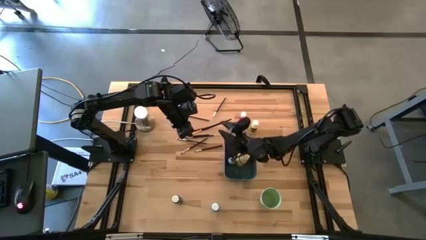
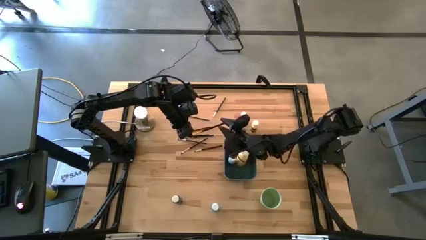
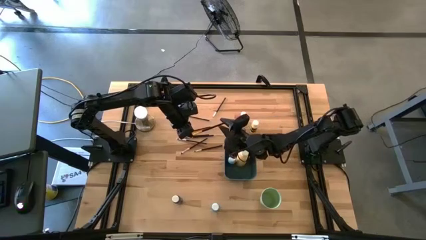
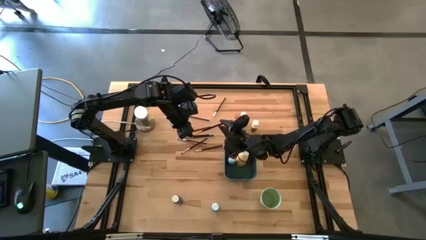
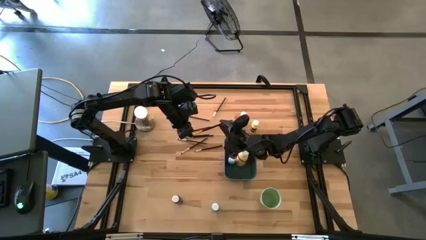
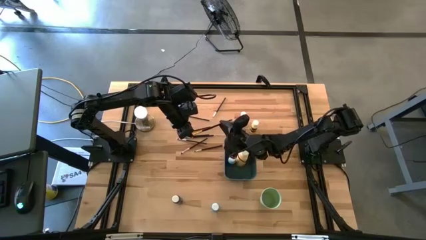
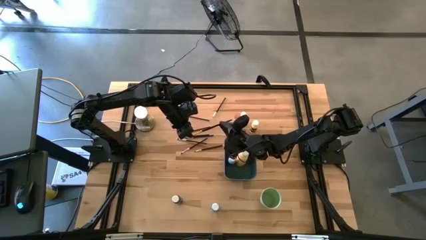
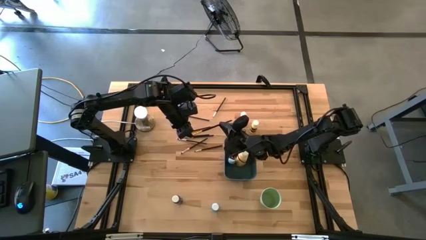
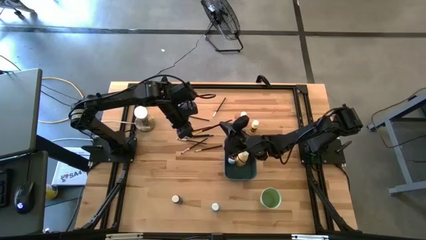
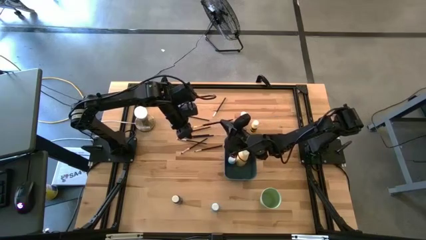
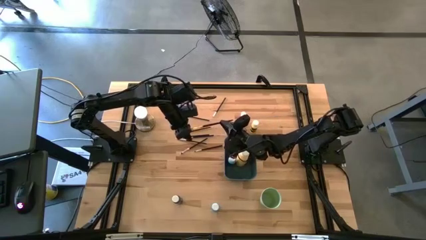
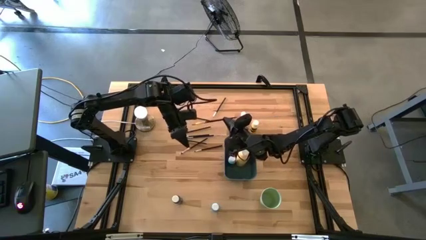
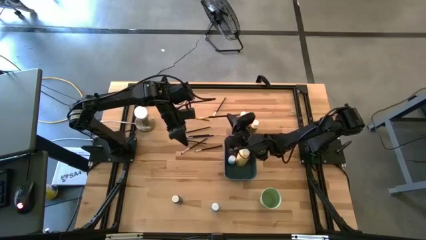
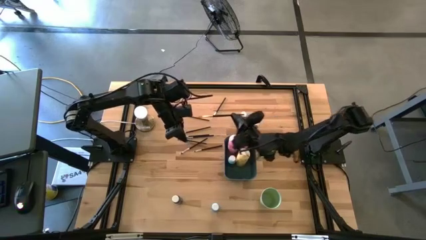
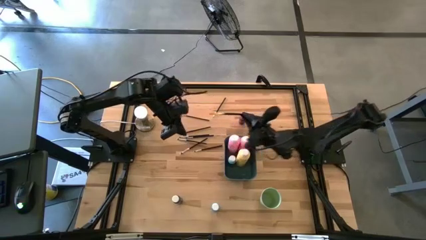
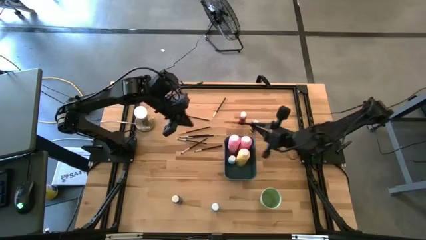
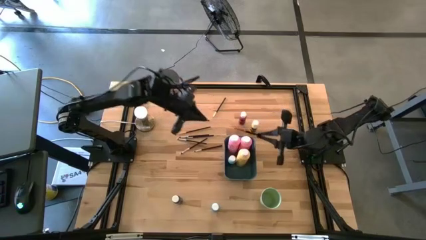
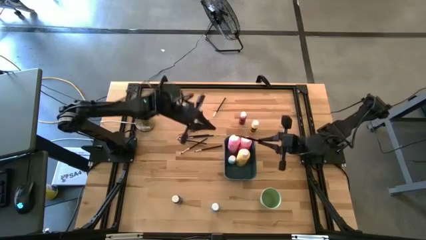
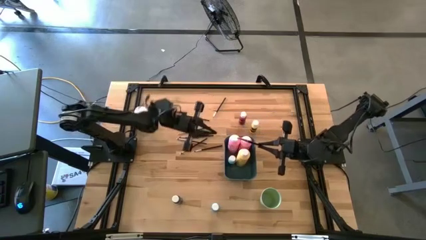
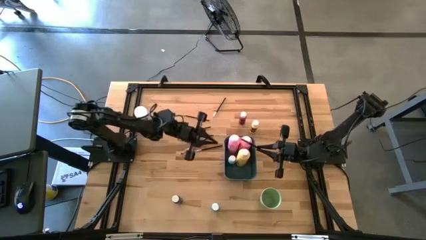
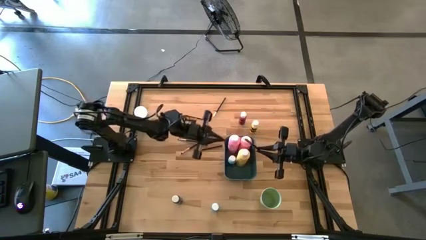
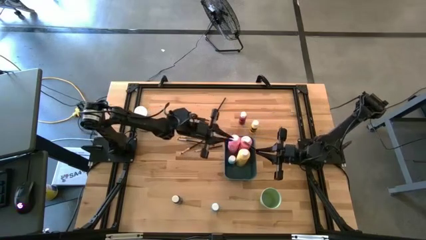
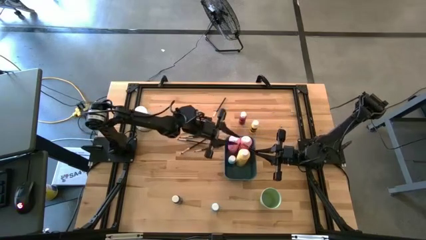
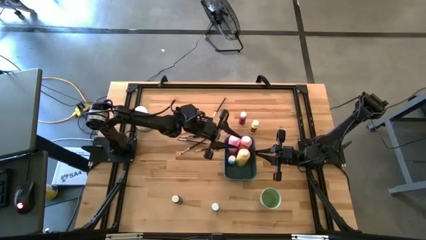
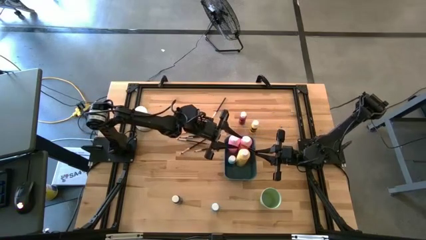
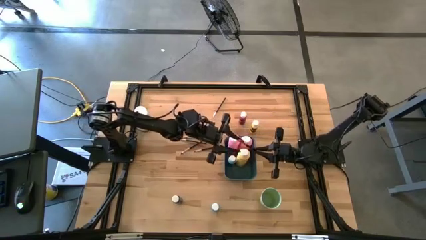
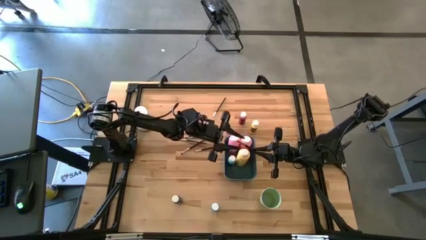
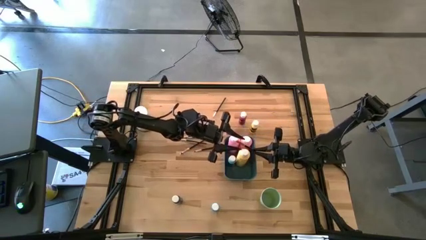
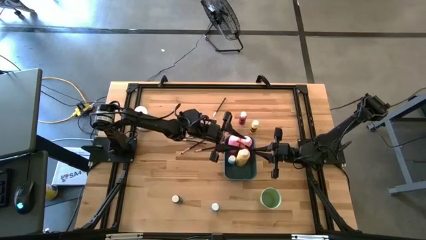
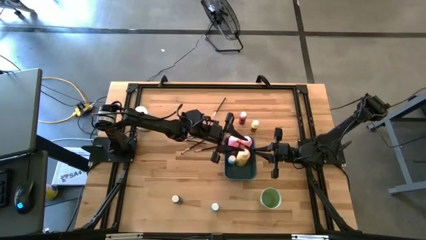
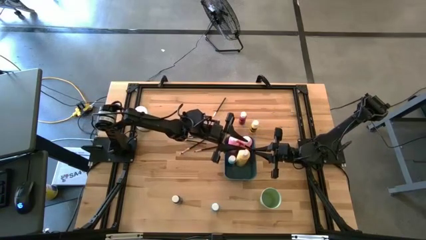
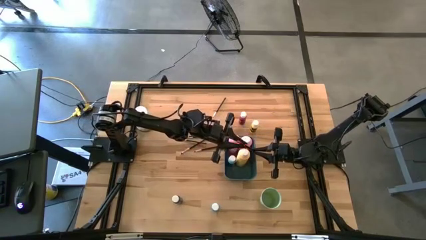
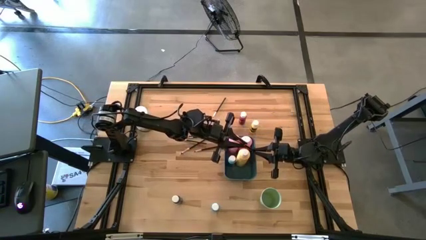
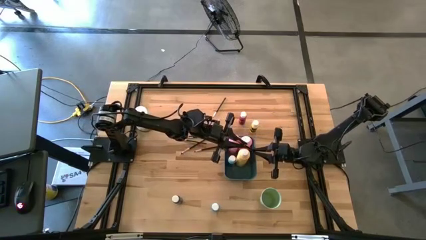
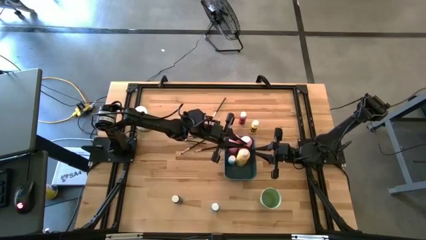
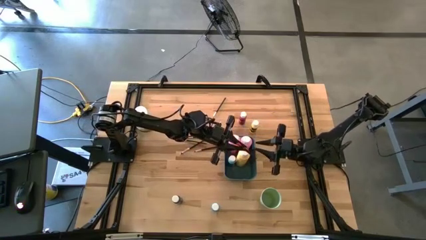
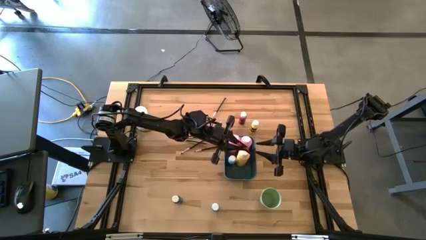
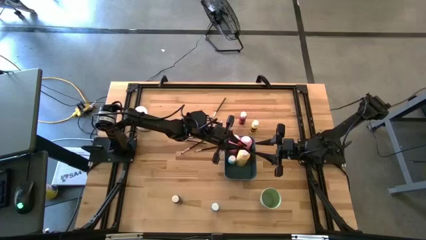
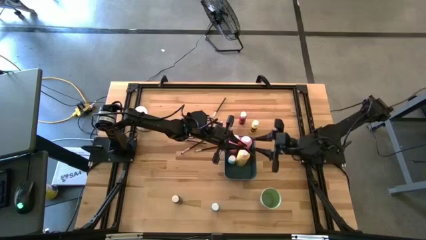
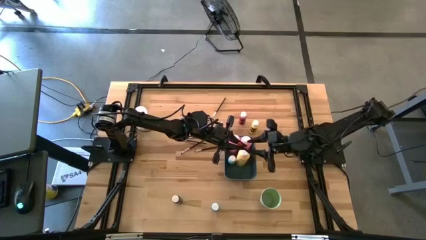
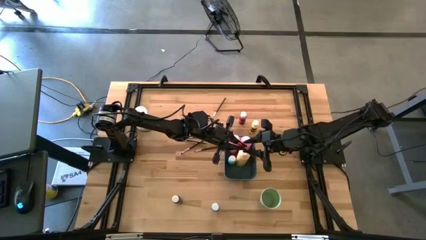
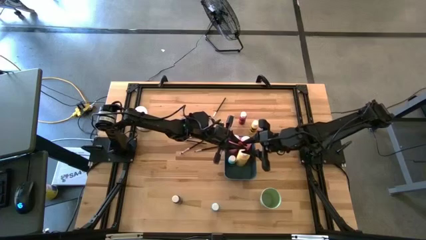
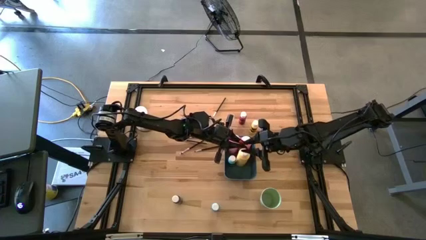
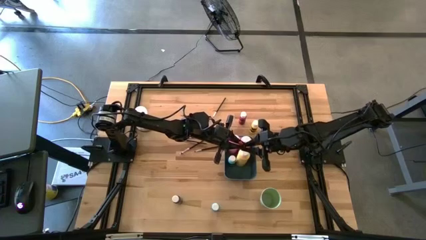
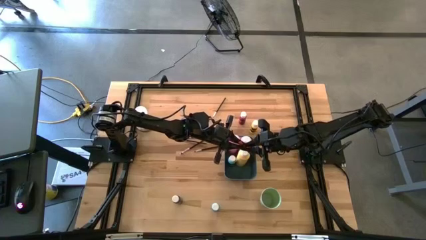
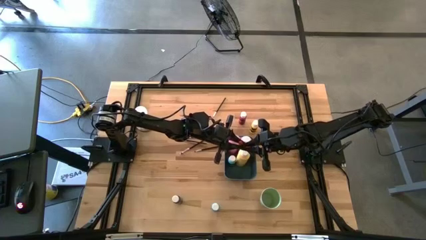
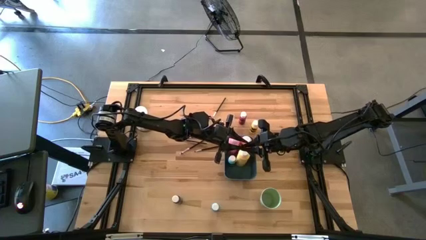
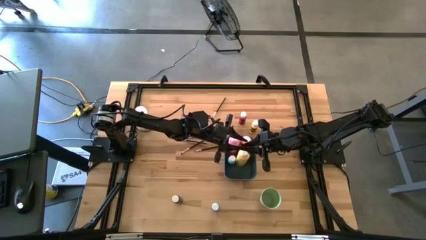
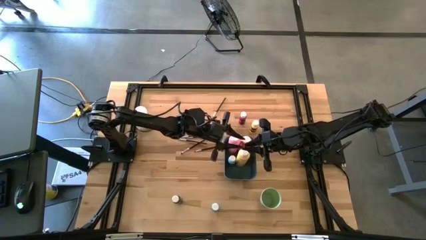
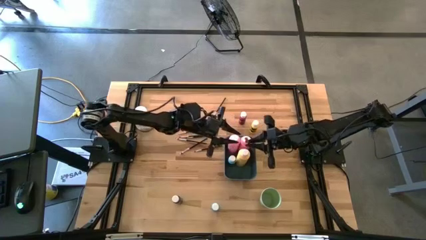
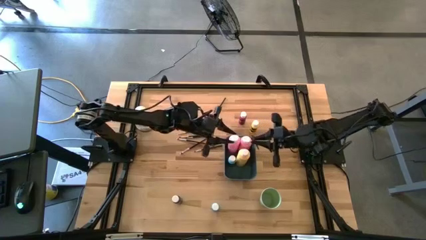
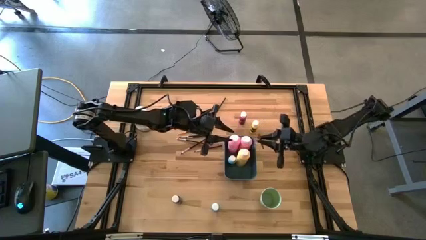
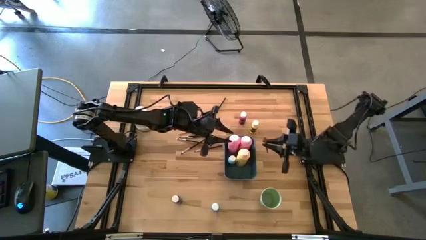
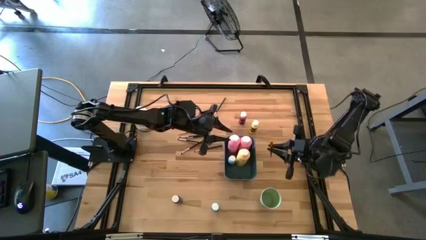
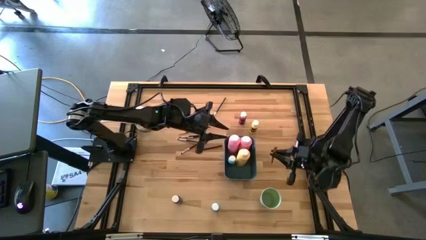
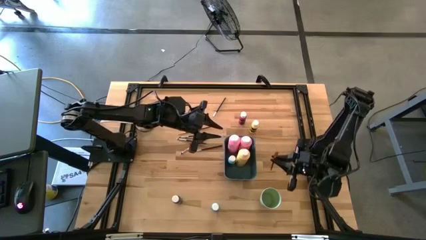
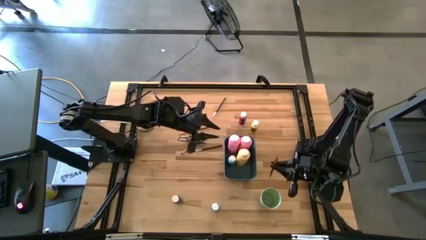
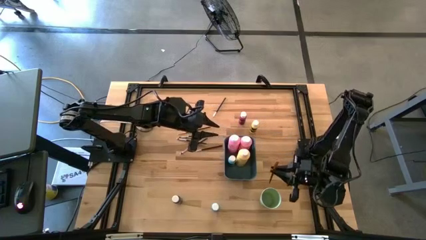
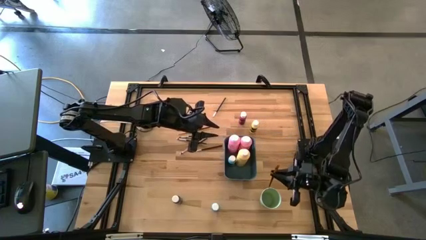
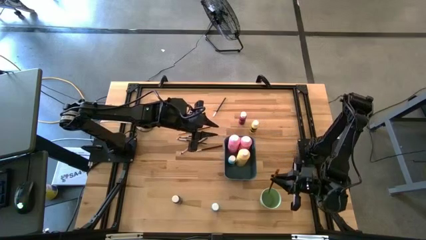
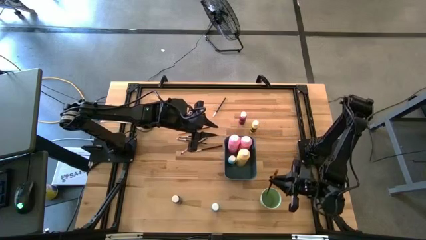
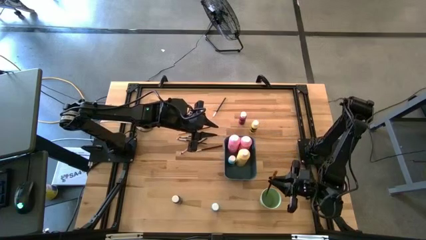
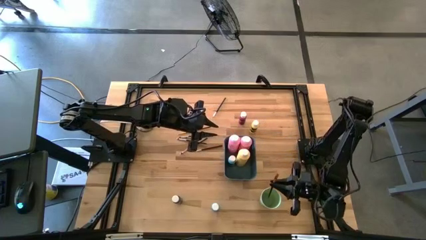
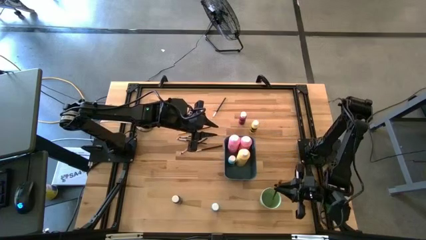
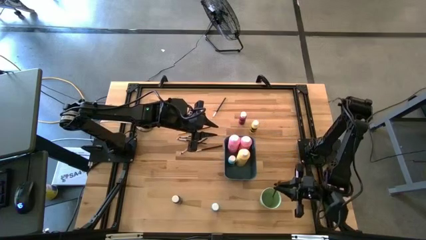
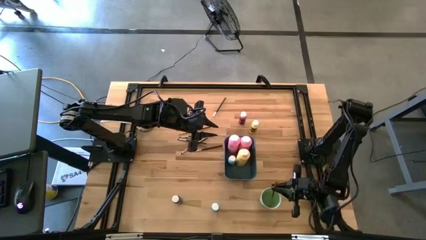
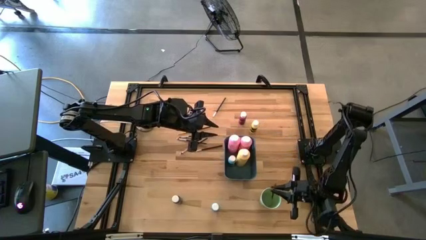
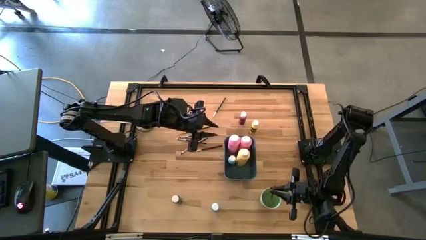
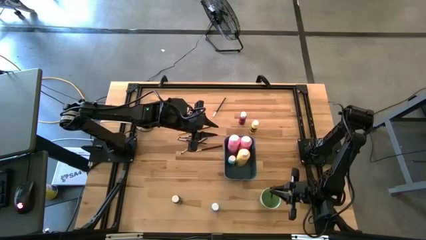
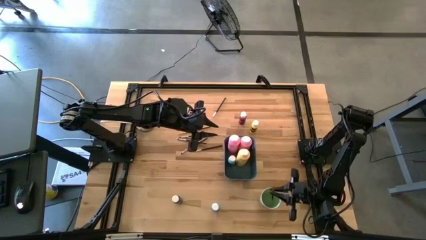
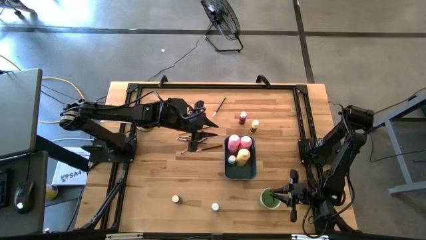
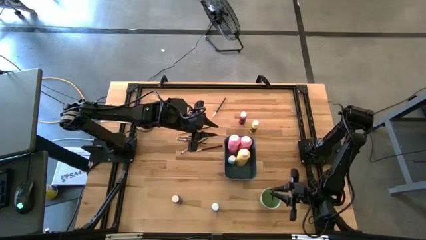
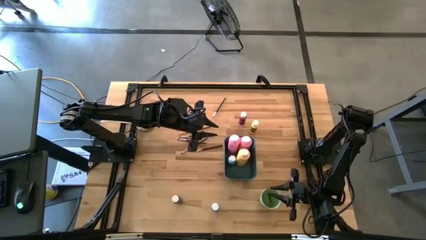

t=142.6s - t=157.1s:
Task: Pick & Place Paint Supplies
Put the black and gold paint brush into the green cup

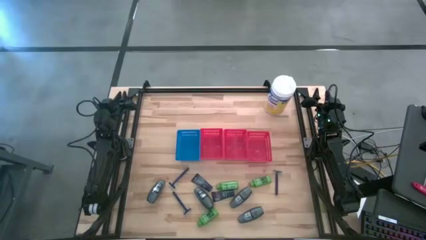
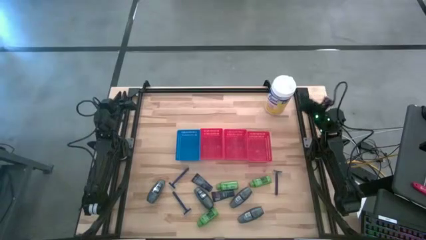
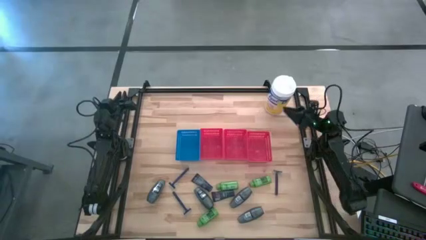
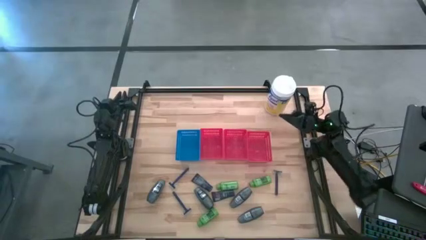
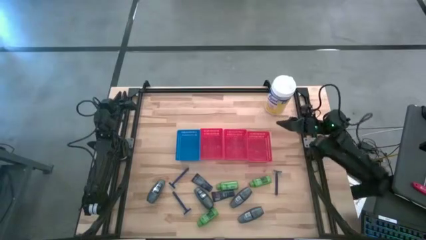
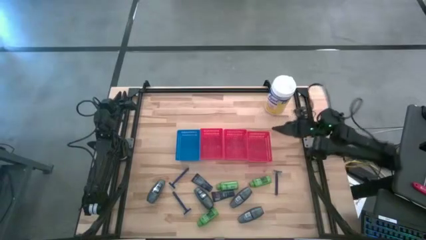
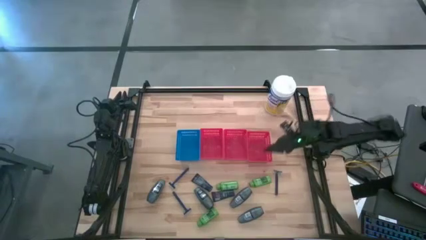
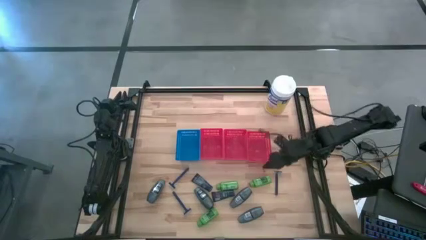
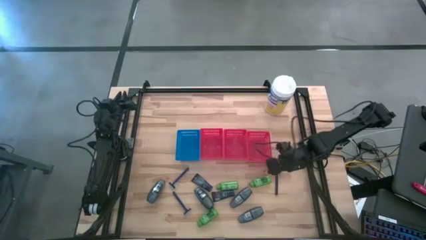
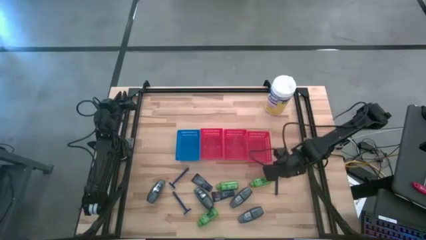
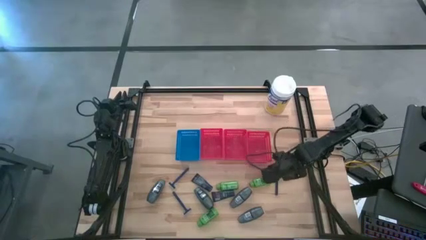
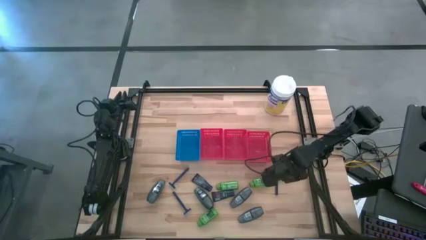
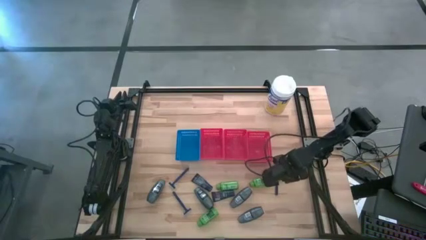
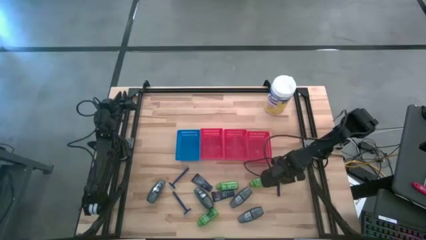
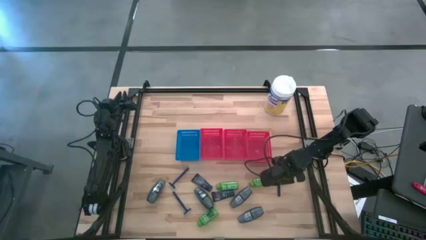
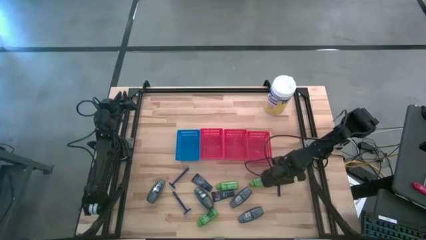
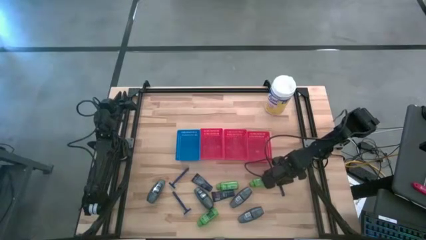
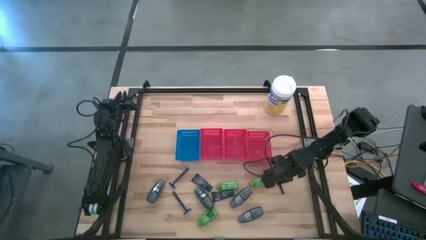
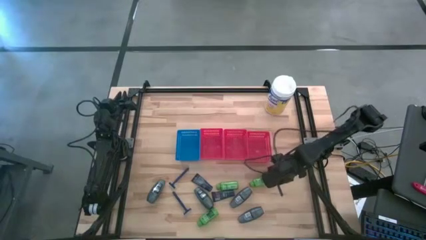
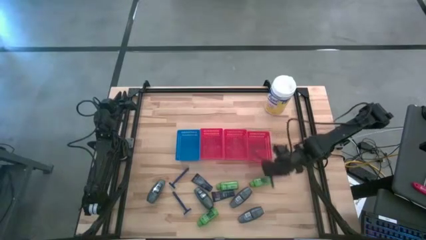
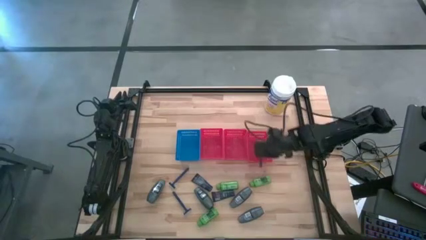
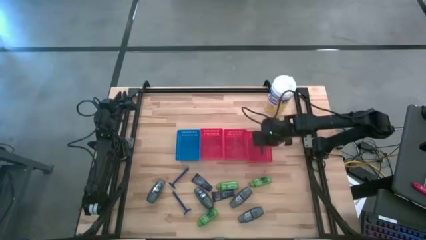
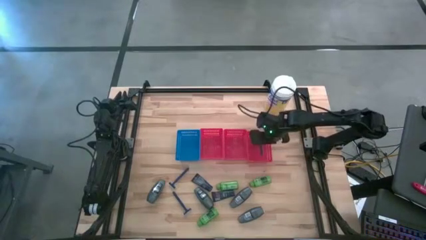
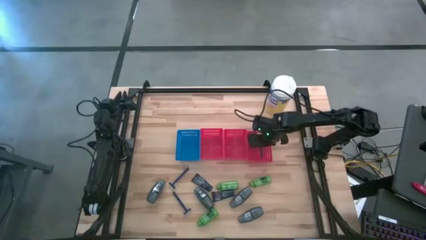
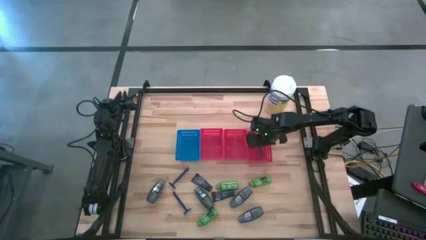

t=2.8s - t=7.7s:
Task: Pick & Place Travel size toiletries
Put the blue razor into the right red bin
